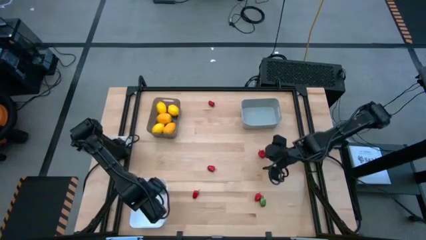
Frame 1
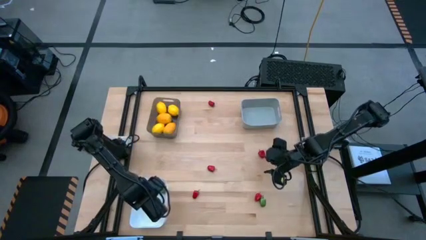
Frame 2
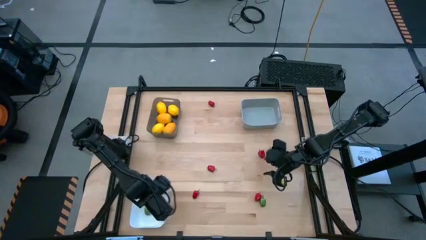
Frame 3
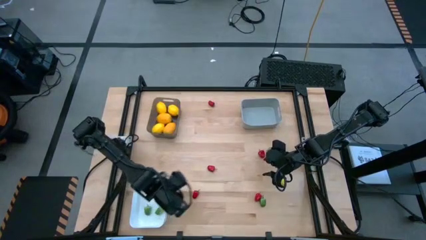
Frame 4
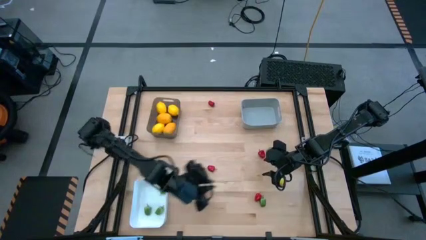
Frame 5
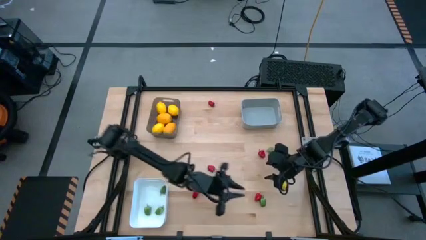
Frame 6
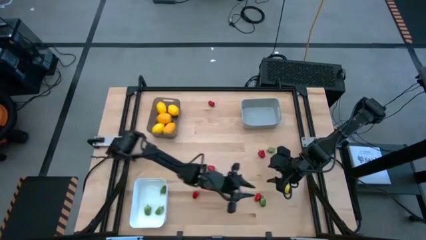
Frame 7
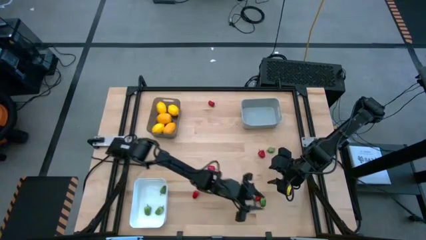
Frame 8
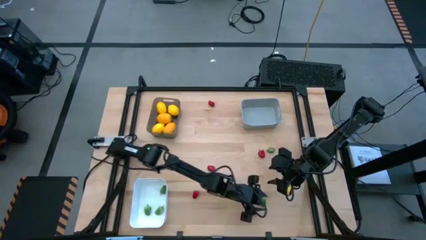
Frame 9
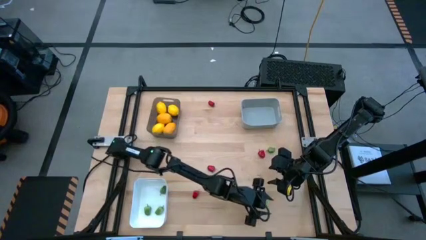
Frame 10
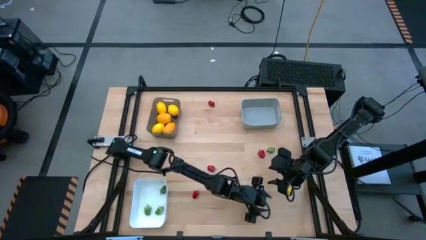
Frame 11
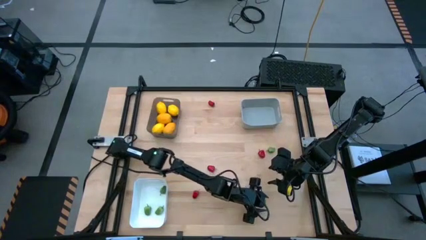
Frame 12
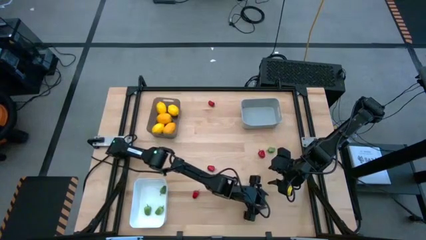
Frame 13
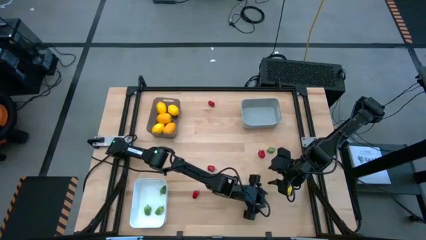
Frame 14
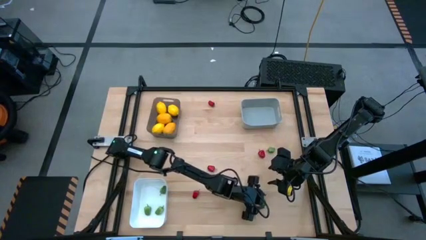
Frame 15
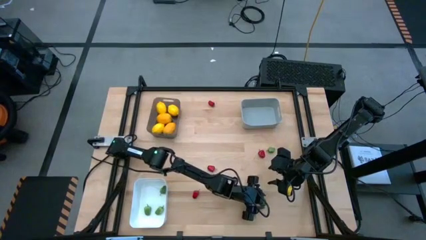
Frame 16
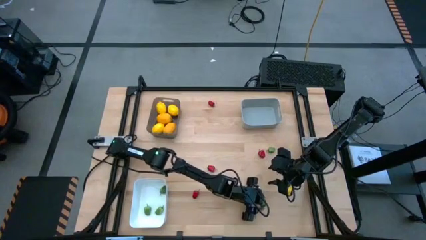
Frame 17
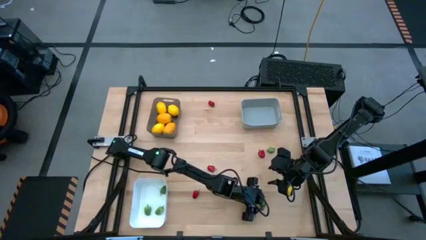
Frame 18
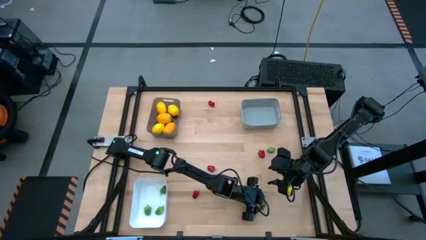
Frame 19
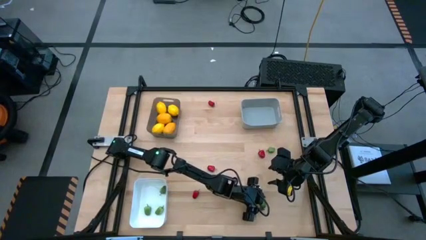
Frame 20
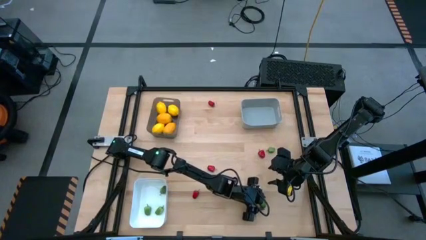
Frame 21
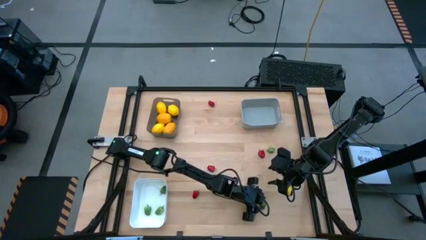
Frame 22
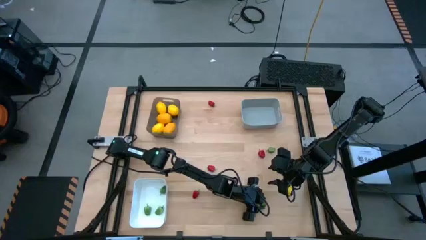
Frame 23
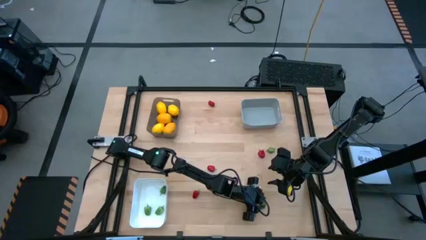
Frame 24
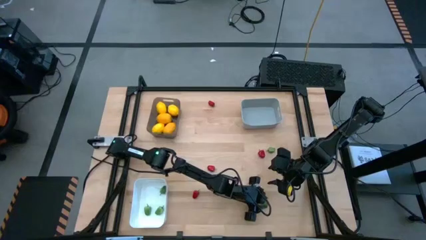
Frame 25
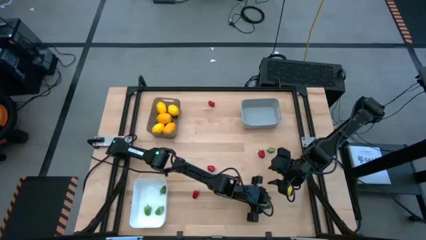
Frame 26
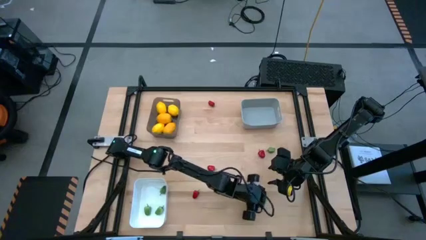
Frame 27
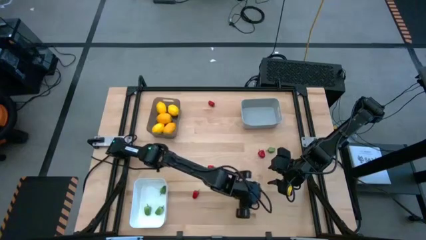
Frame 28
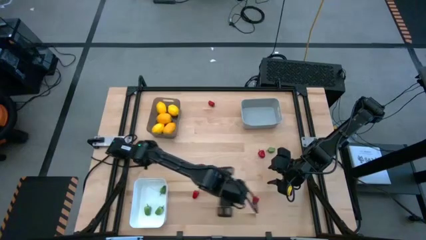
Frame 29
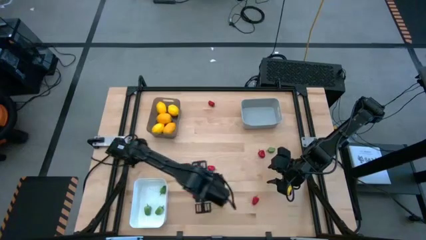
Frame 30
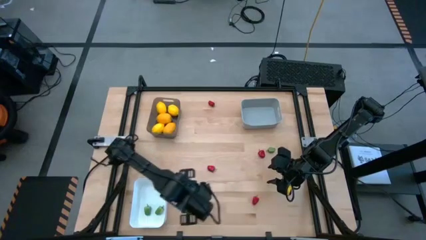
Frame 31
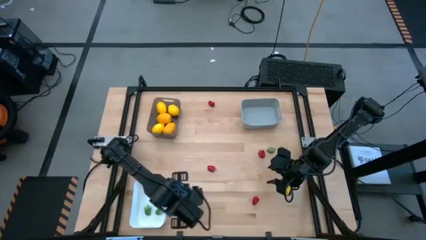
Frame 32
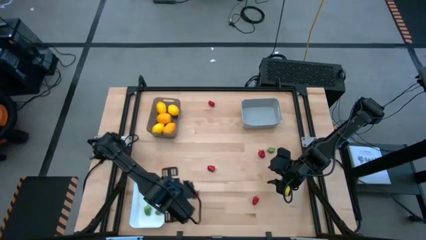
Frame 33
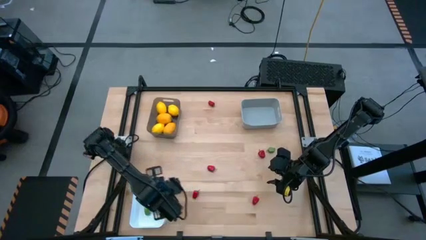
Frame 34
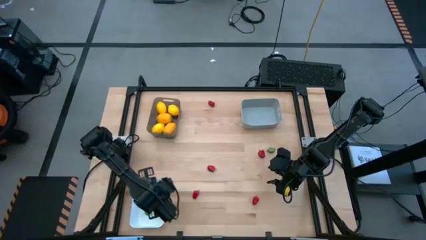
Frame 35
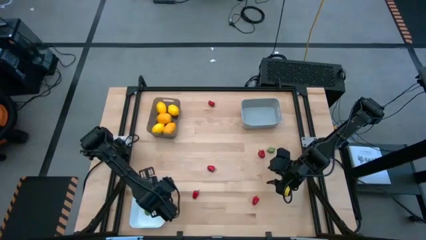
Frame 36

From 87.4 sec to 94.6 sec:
Task: Sort produce into baskets
Put the green bell pepper into the white bin

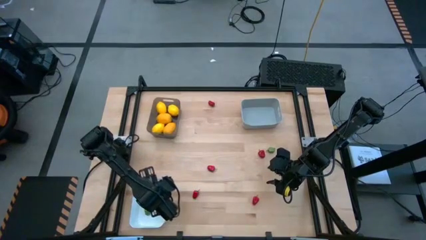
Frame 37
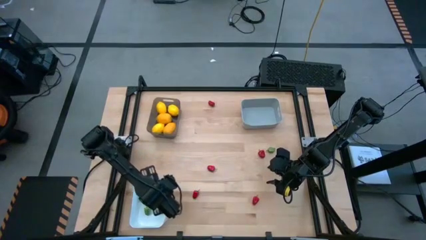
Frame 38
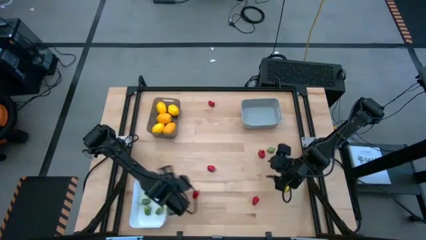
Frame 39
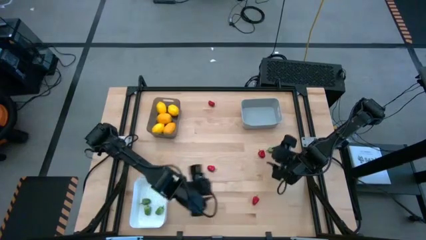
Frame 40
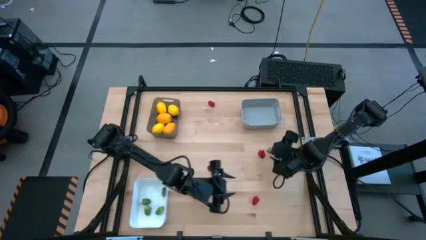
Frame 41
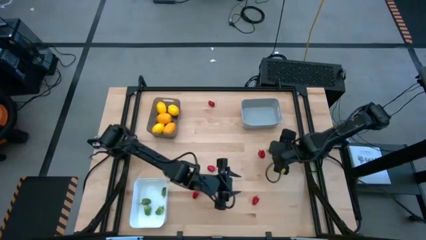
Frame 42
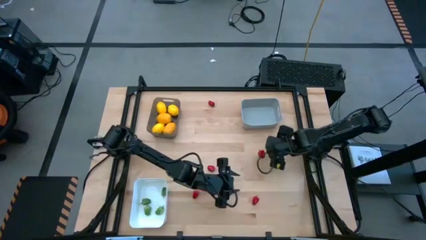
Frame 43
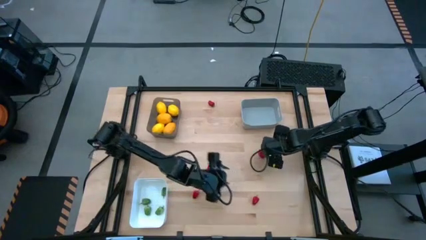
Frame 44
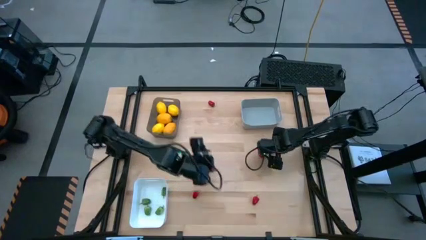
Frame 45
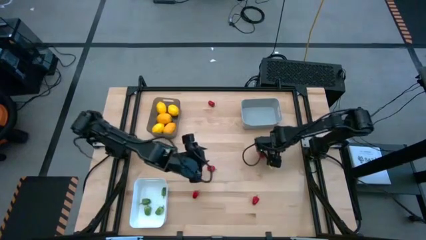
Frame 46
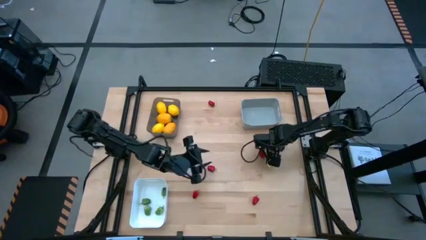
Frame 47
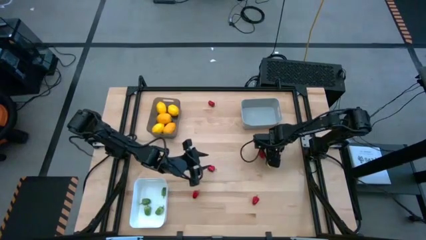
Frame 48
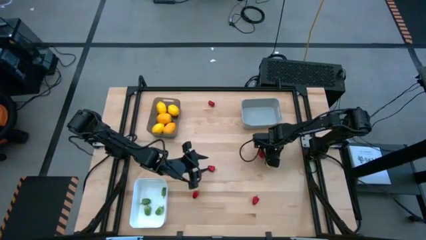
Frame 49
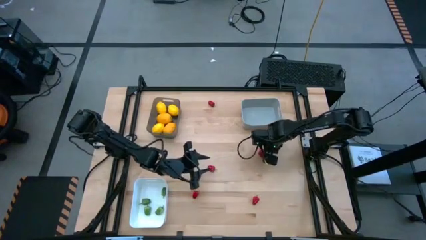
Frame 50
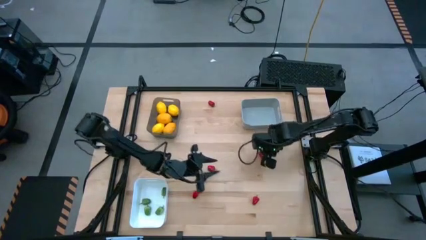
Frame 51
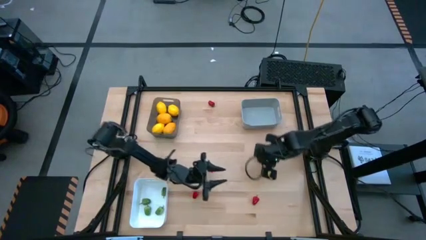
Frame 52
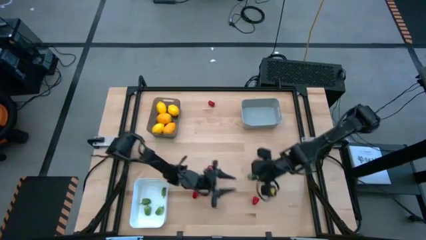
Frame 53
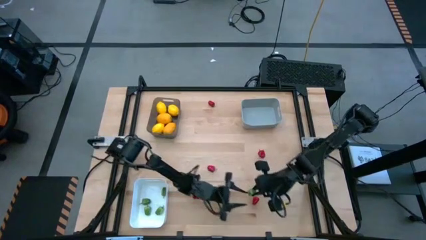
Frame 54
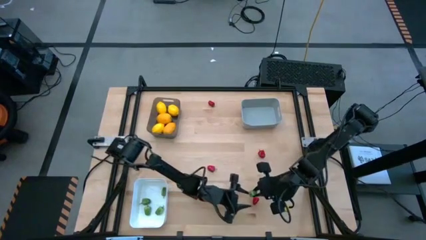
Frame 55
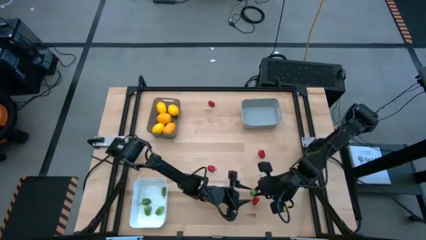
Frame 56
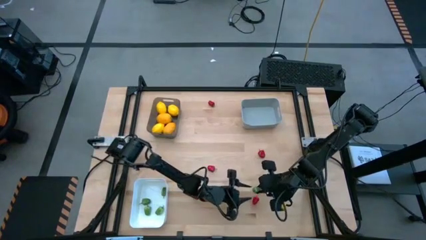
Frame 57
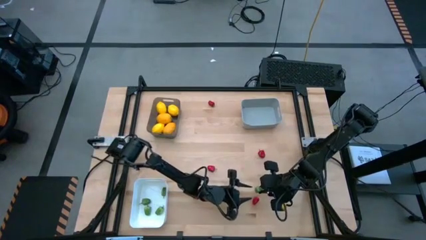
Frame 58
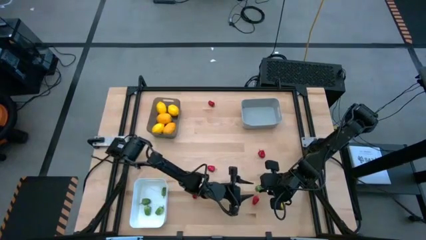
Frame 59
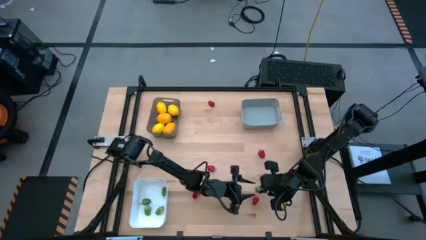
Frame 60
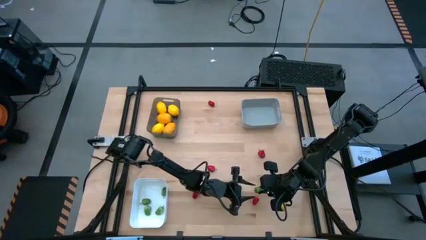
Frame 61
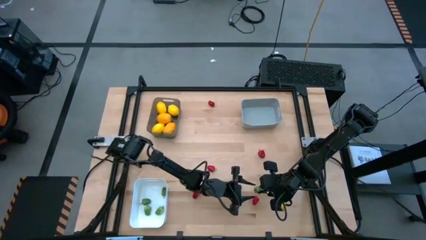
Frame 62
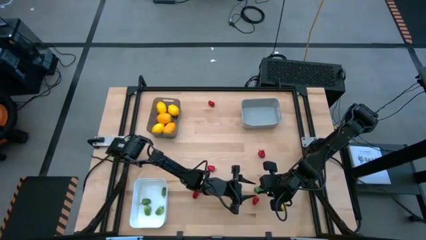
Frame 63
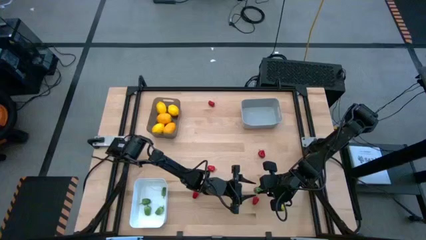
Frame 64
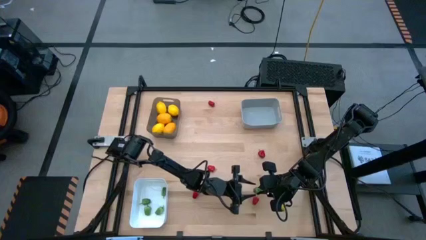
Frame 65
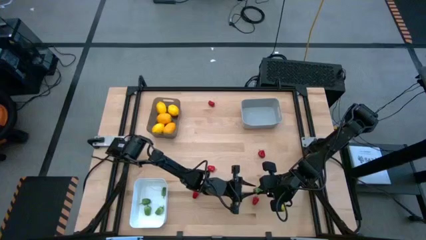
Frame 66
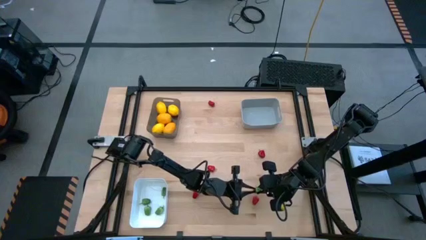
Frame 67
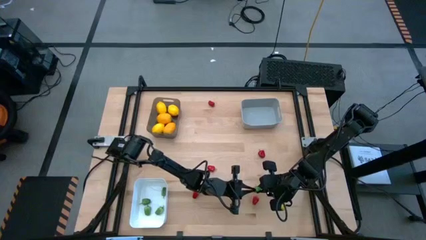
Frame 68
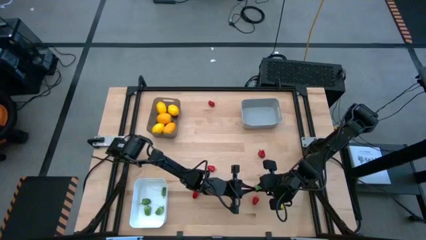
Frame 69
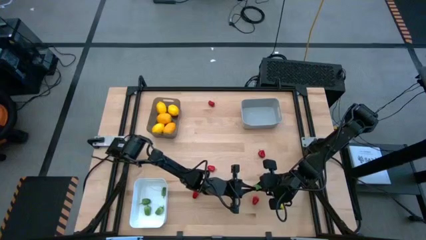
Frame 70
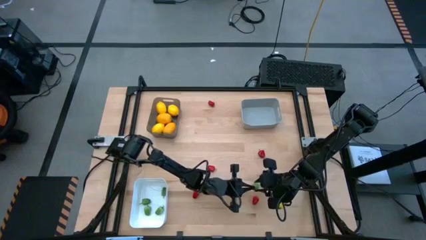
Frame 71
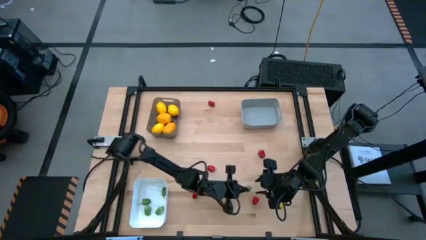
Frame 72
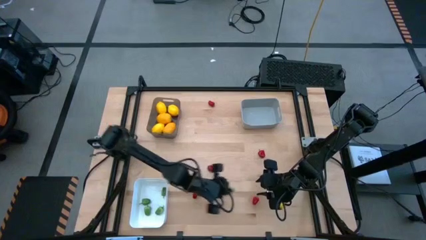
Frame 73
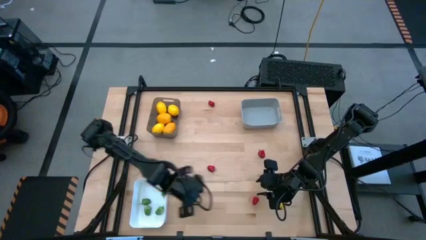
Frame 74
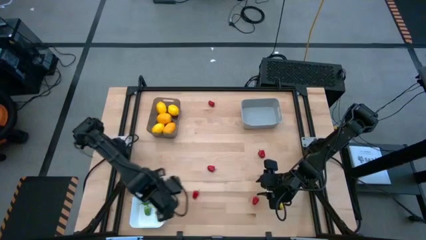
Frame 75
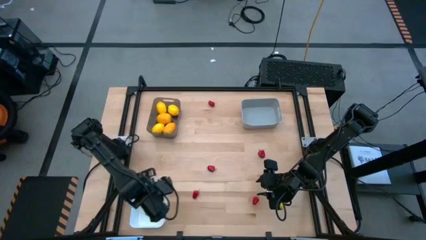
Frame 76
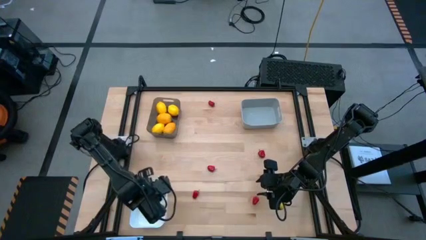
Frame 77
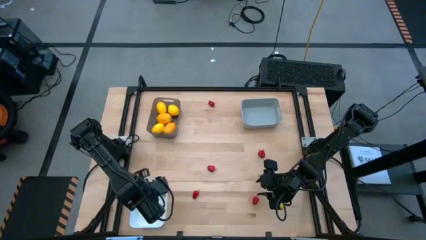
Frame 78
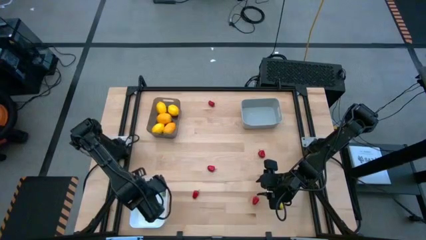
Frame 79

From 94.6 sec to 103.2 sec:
Put the green bell pepper into the white bin
